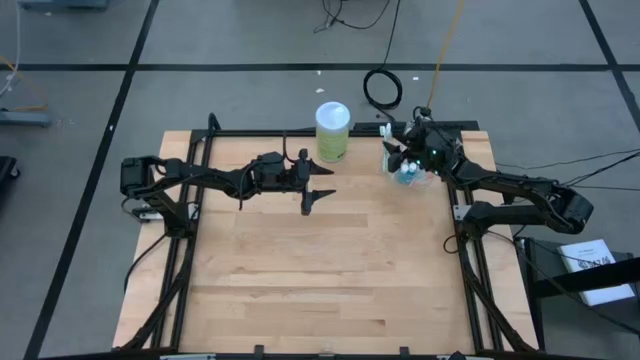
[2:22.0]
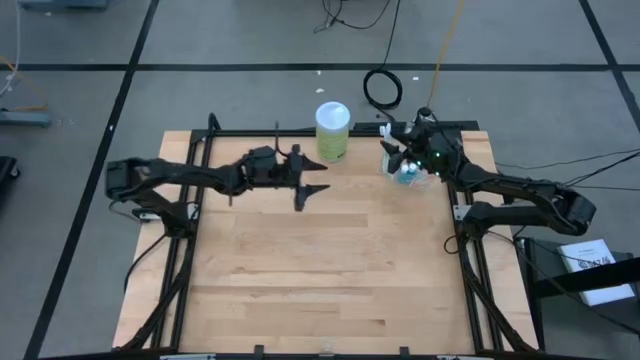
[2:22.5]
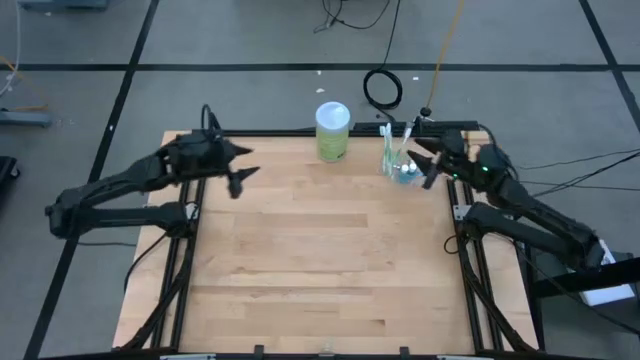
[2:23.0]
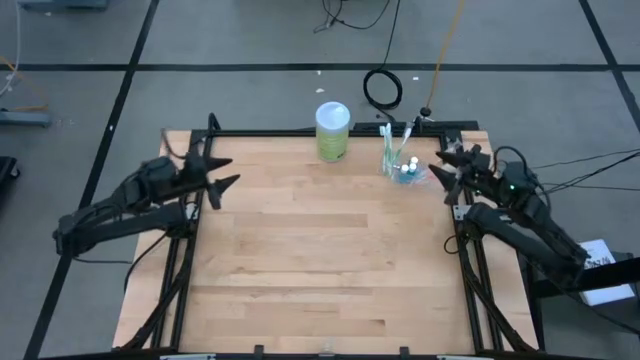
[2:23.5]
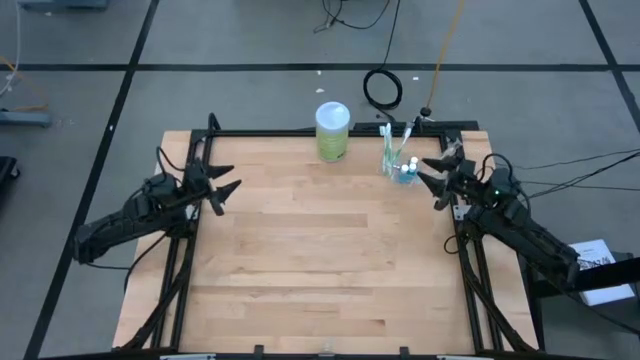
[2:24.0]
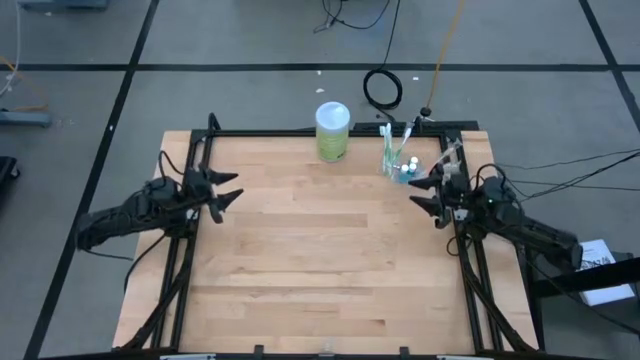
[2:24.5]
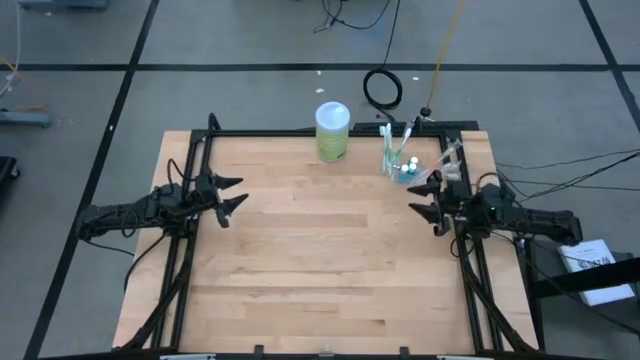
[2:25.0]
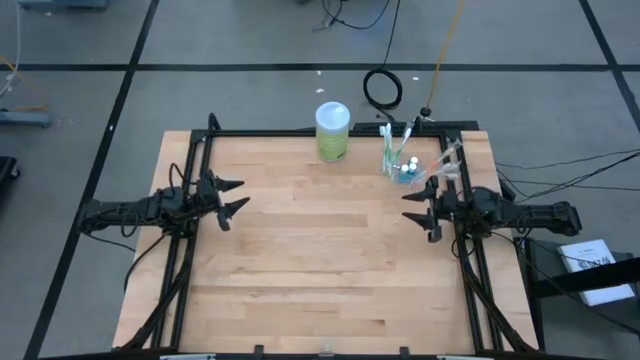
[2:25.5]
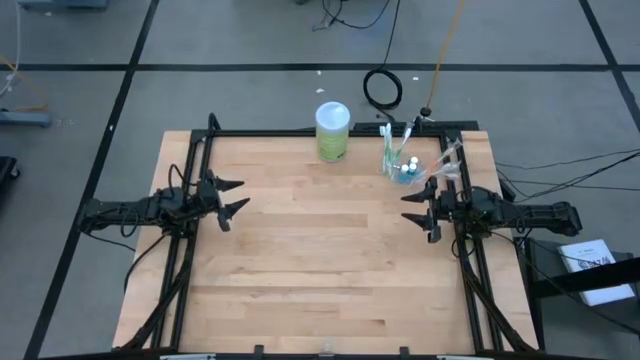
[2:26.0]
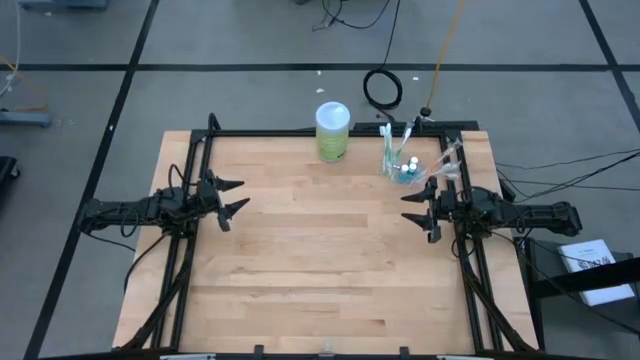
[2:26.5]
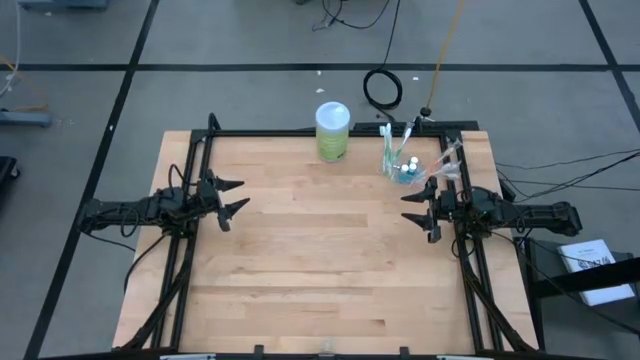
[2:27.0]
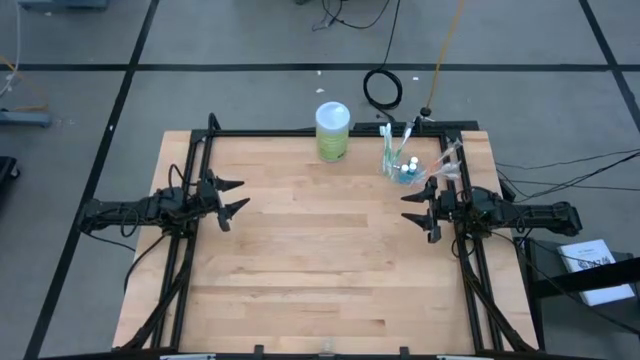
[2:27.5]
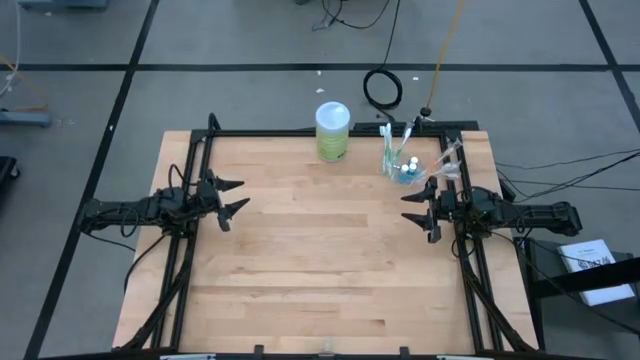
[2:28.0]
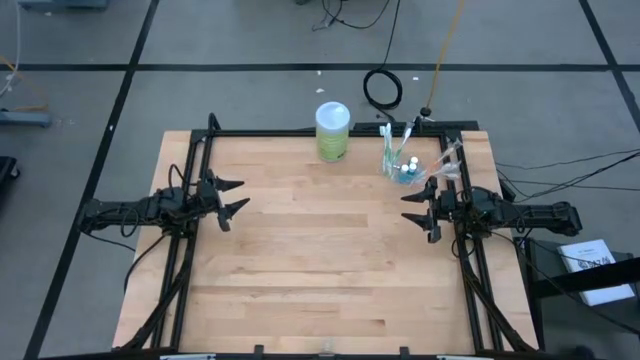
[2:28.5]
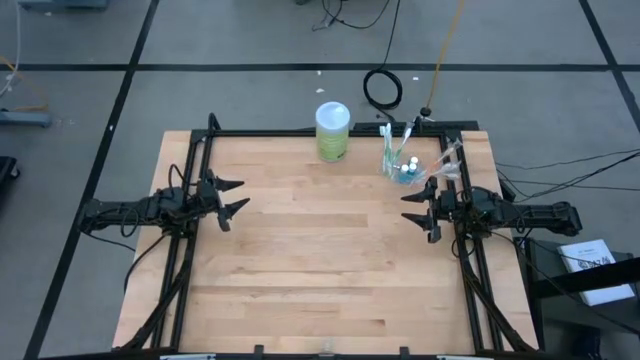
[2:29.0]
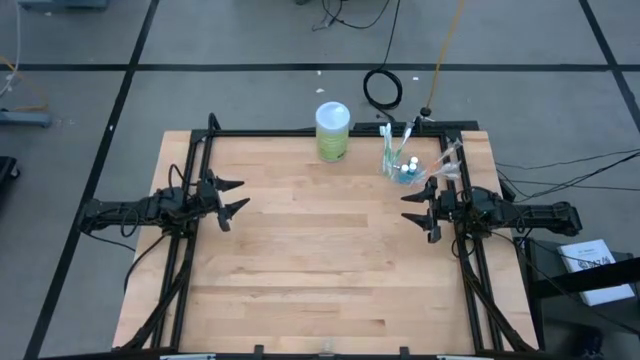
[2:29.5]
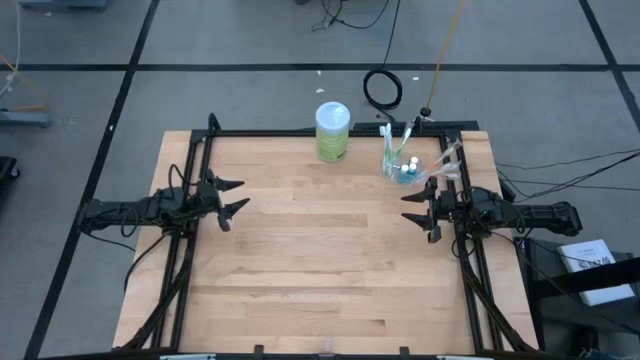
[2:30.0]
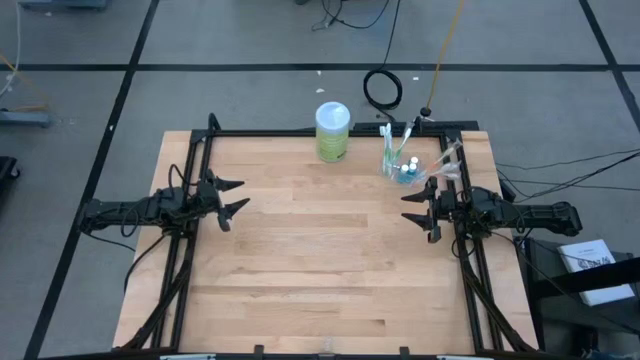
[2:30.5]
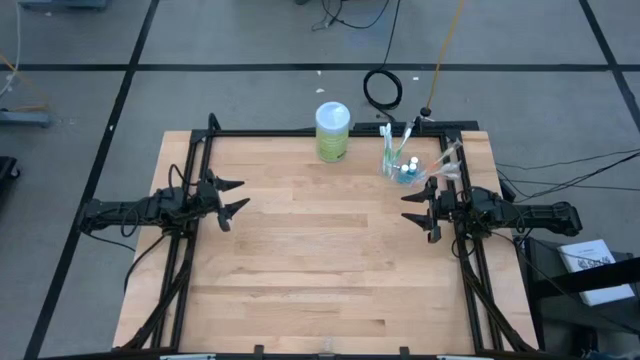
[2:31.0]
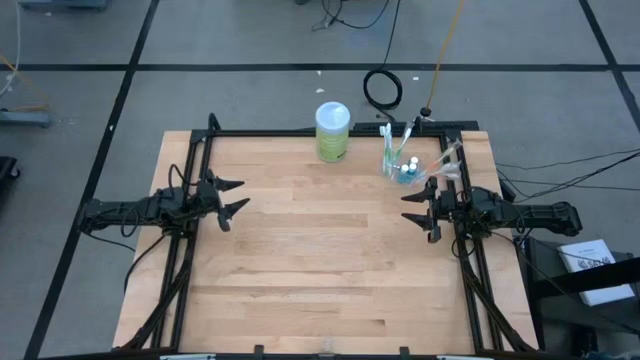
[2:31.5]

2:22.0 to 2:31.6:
Task: Pick & Place toothbrushing station
Return to Home Position

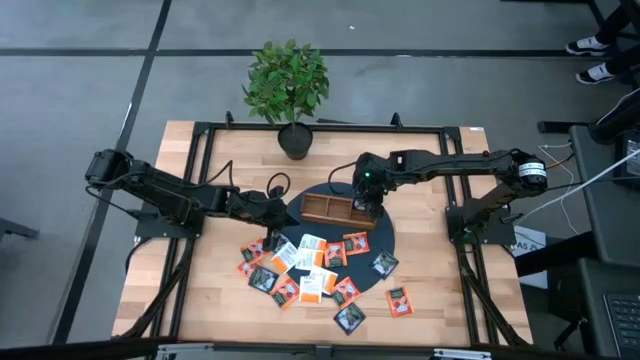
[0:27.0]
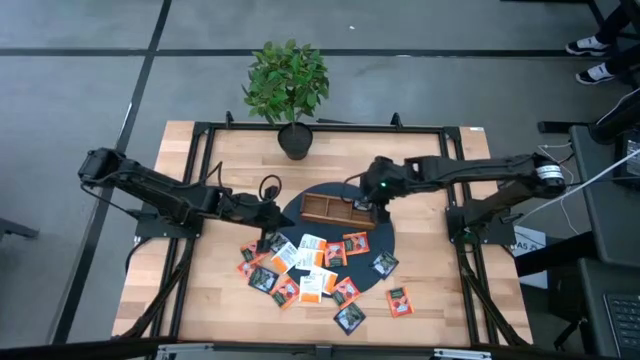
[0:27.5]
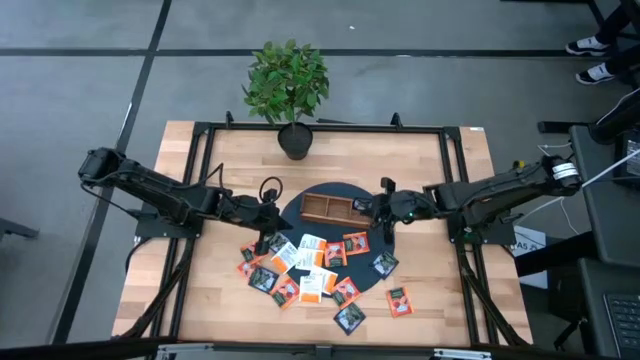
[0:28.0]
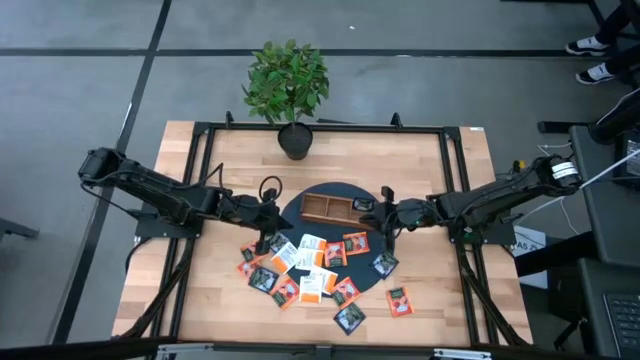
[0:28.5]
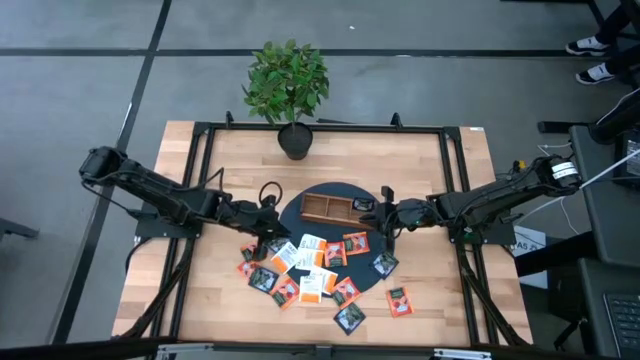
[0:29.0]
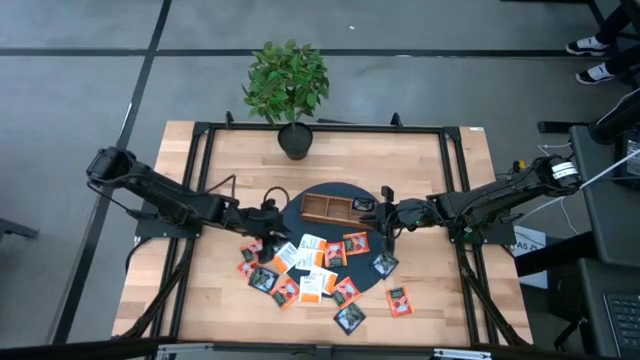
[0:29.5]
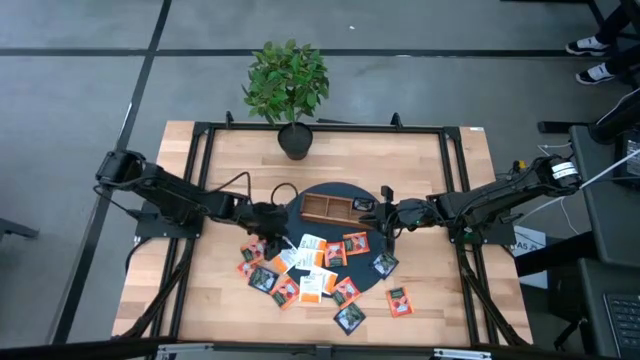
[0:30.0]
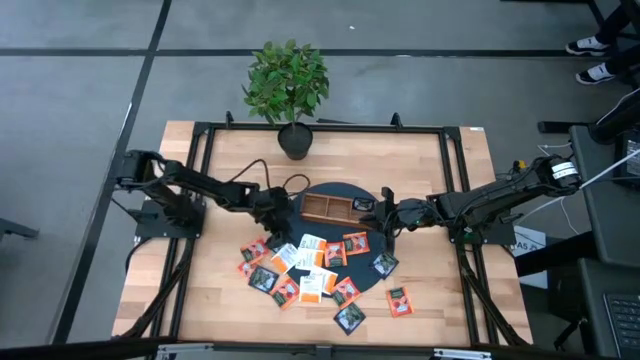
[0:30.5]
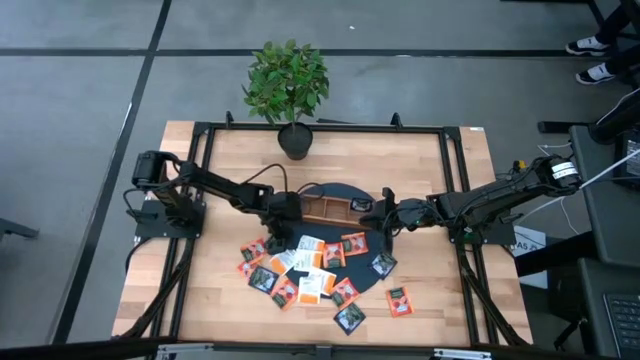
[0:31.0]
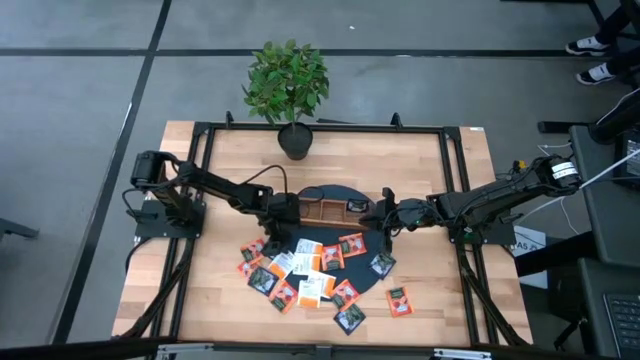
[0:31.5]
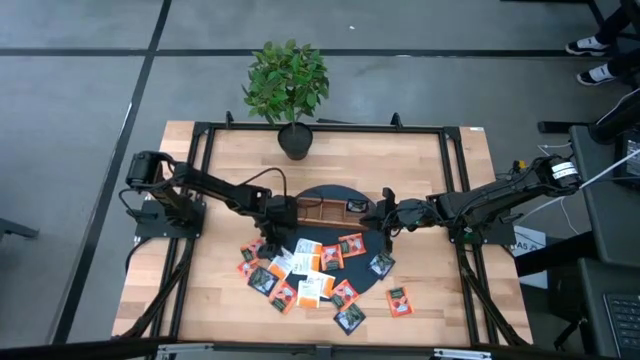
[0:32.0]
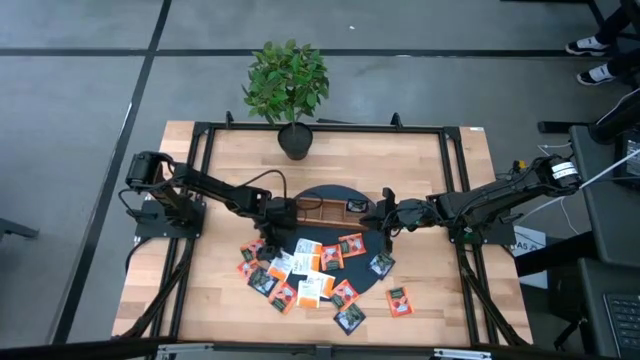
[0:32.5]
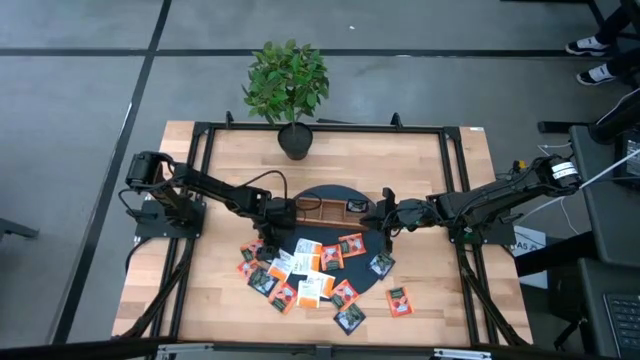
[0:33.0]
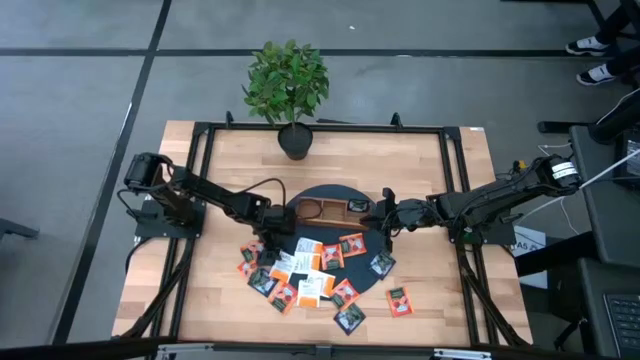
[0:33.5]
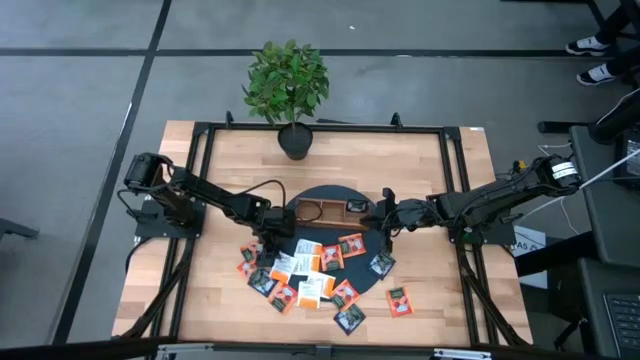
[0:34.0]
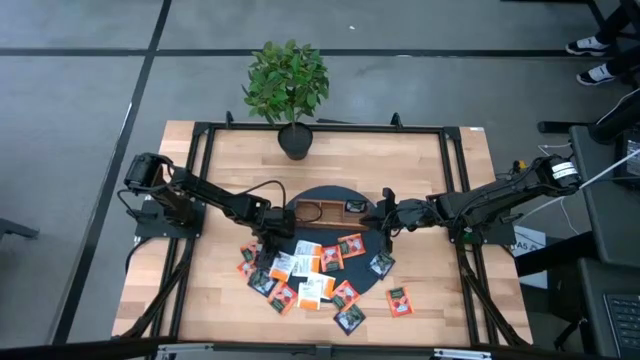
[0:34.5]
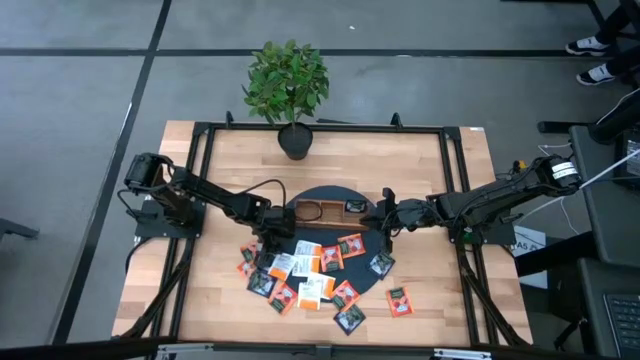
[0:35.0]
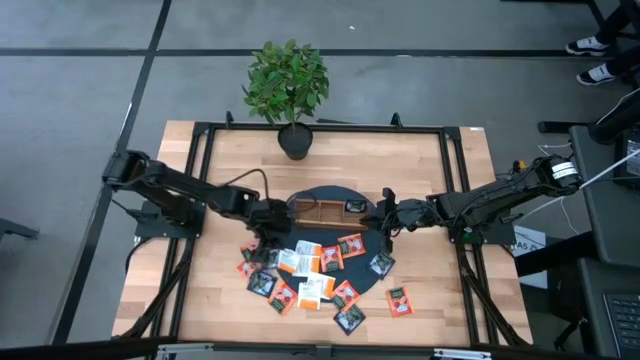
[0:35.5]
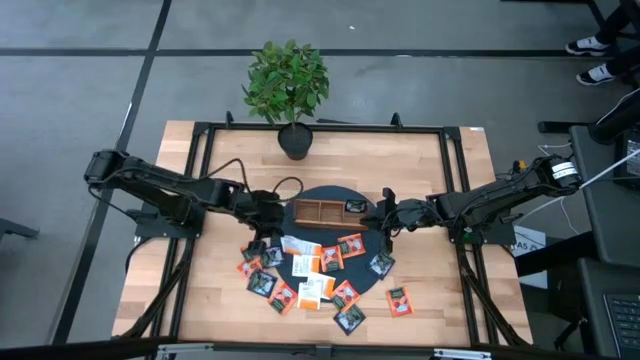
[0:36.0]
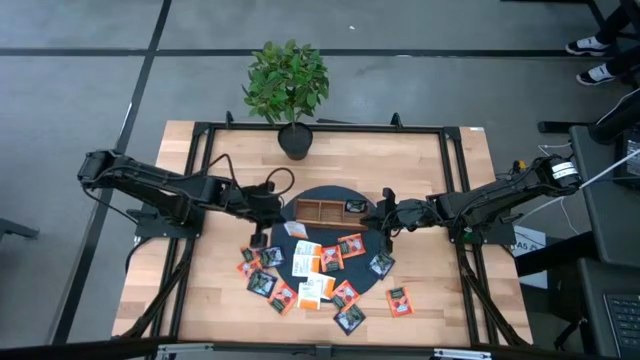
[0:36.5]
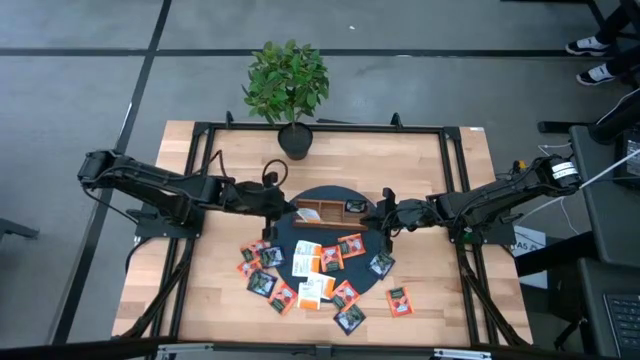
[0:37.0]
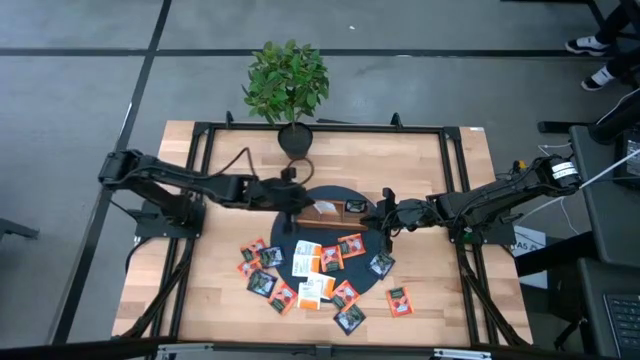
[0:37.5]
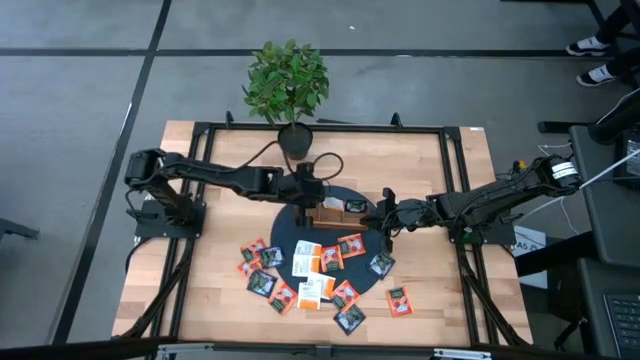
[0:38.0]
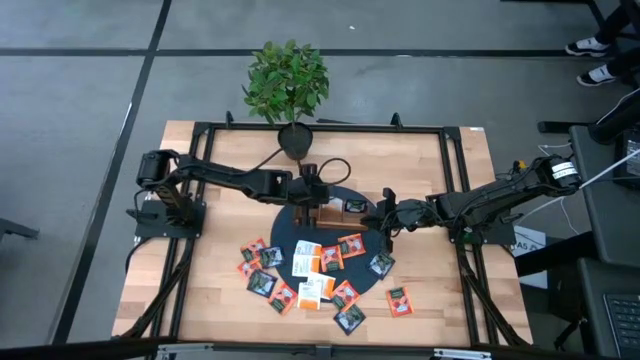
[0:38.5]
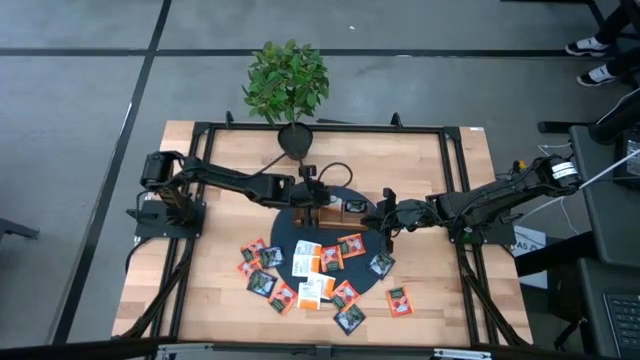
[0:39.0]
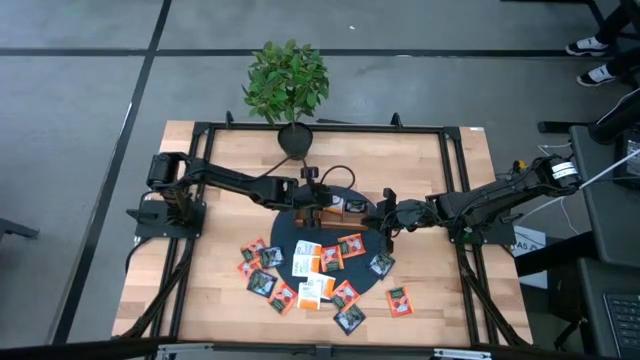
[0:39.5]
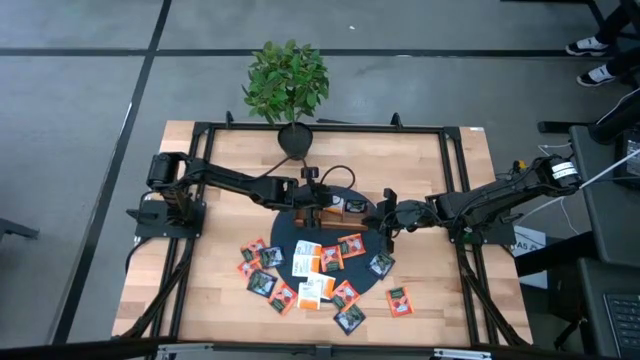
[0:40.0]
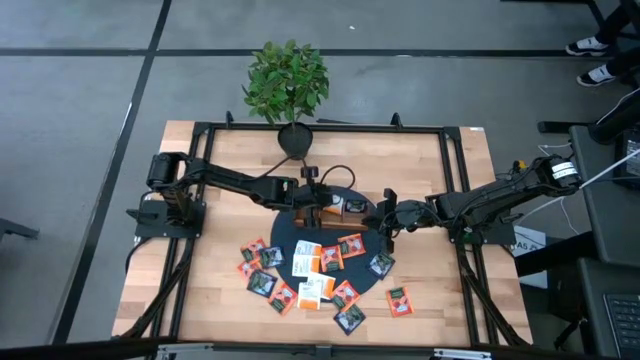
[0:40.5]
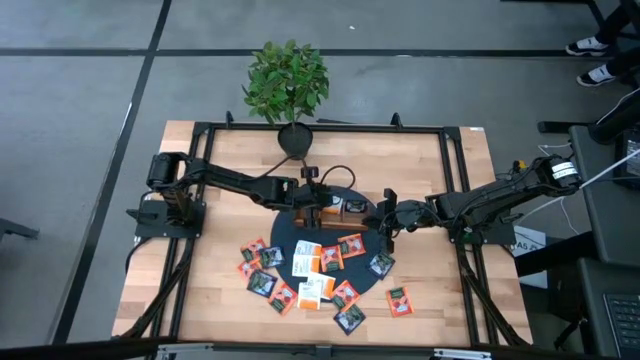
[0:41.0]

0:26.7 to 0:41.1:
Task: Pick & Place Tea
Put the white tea bag into the middle of the wooden organizer
